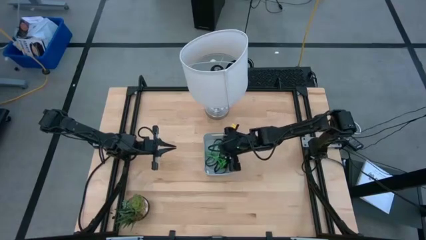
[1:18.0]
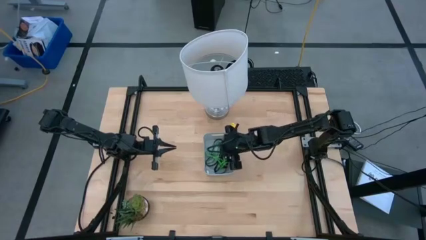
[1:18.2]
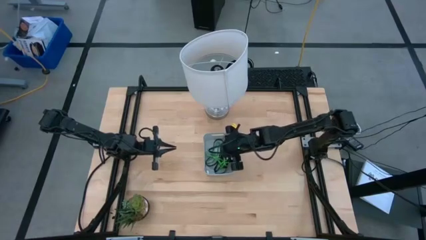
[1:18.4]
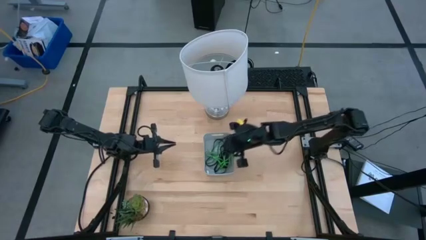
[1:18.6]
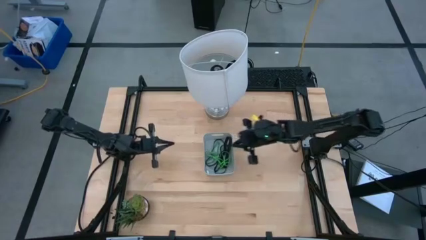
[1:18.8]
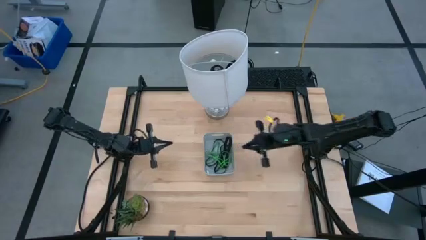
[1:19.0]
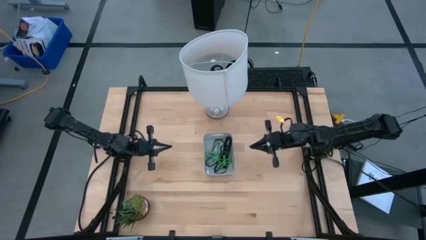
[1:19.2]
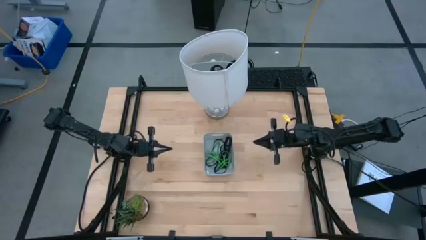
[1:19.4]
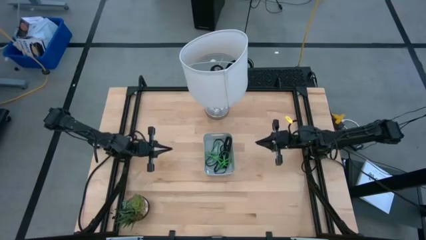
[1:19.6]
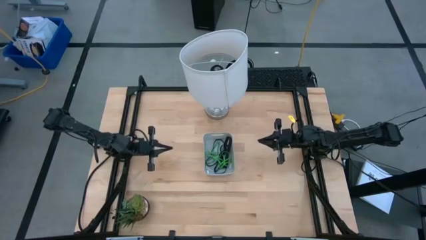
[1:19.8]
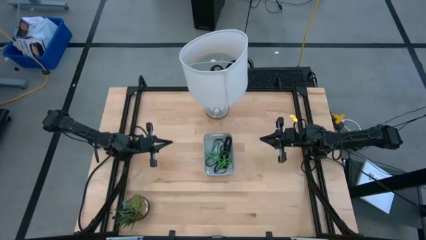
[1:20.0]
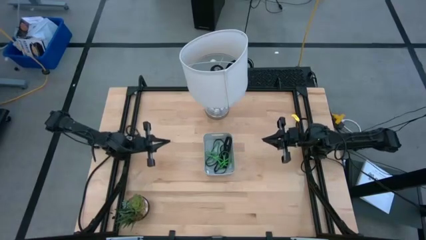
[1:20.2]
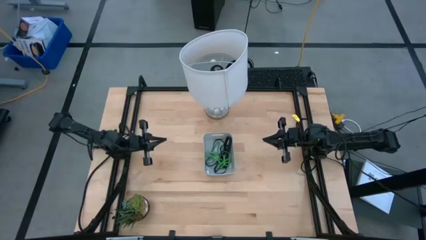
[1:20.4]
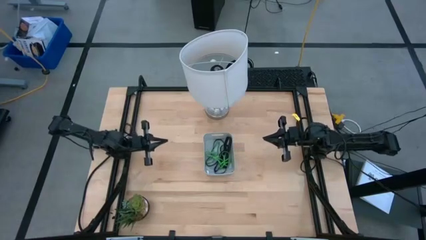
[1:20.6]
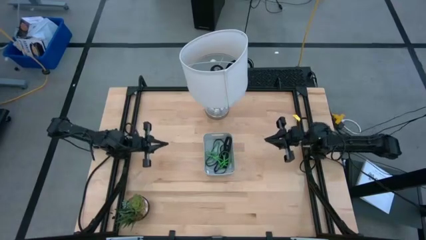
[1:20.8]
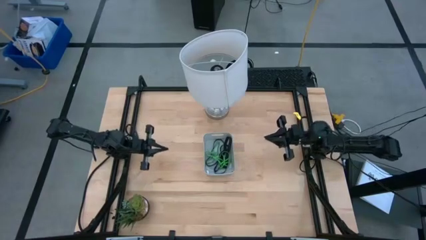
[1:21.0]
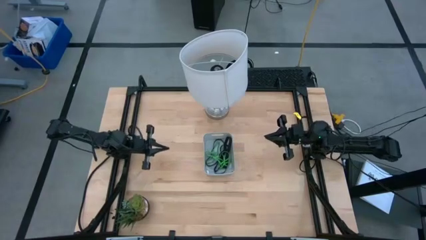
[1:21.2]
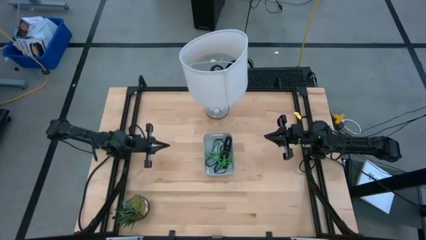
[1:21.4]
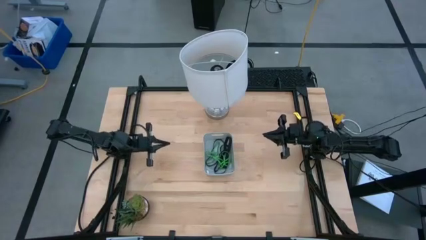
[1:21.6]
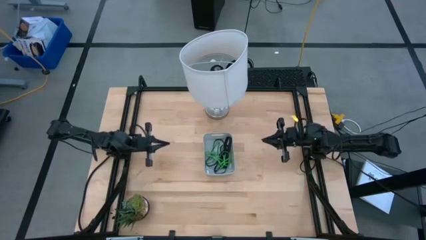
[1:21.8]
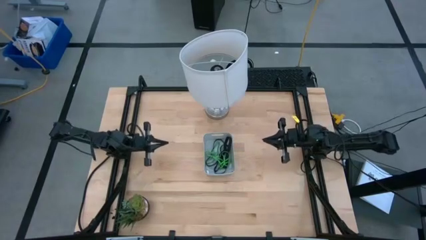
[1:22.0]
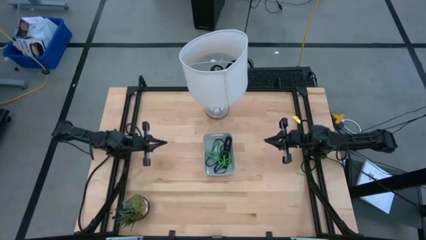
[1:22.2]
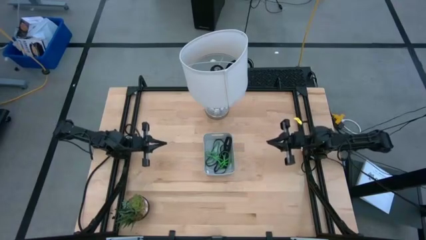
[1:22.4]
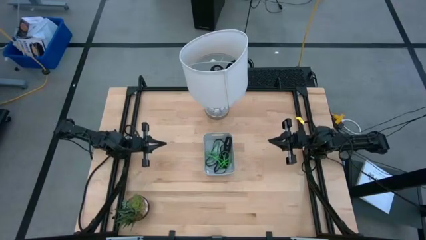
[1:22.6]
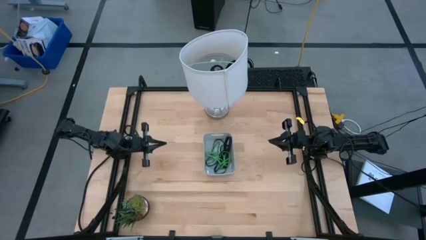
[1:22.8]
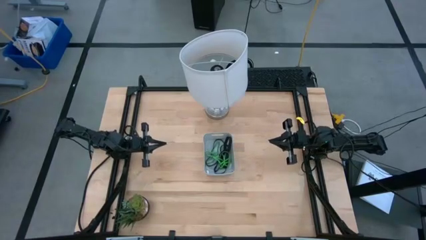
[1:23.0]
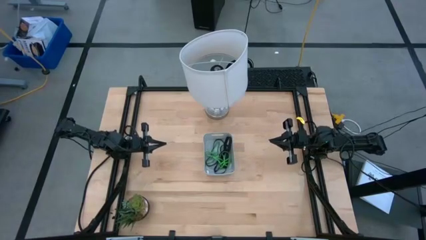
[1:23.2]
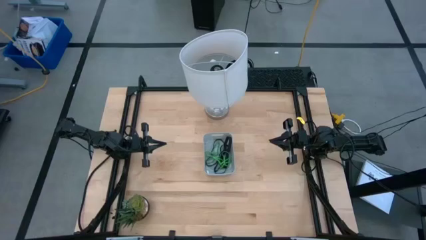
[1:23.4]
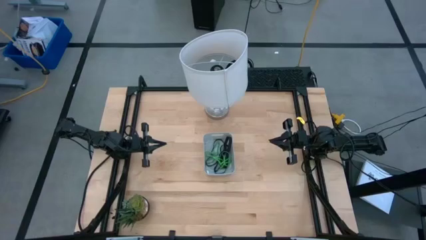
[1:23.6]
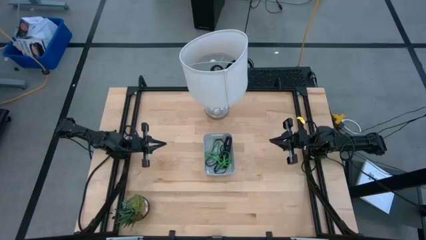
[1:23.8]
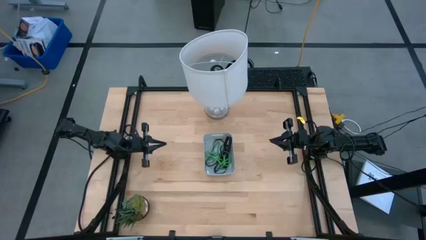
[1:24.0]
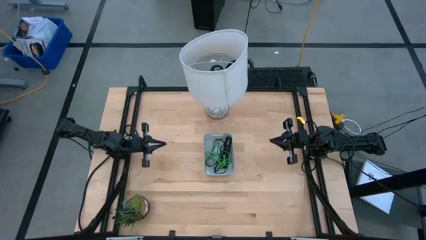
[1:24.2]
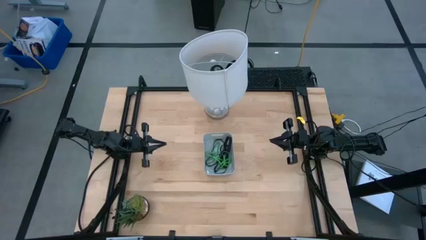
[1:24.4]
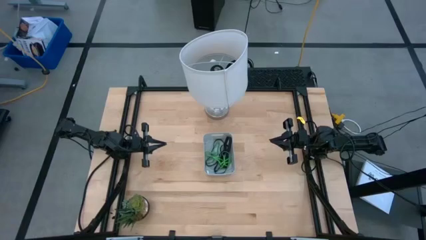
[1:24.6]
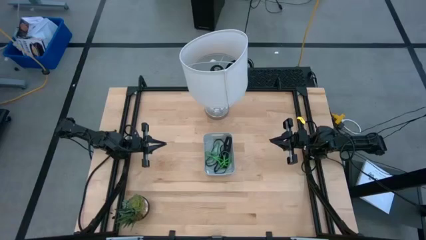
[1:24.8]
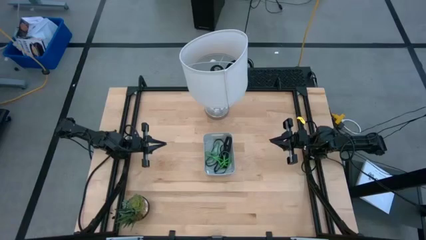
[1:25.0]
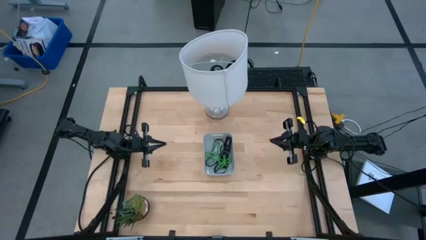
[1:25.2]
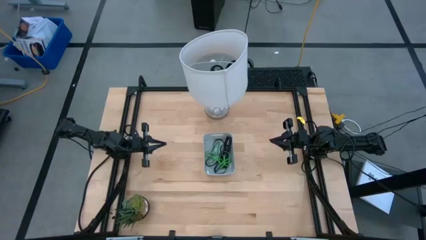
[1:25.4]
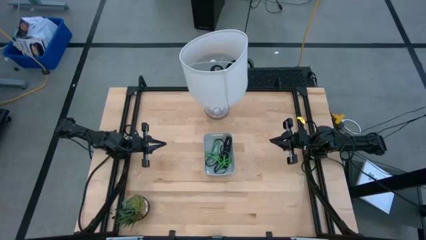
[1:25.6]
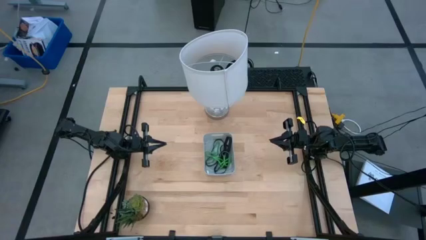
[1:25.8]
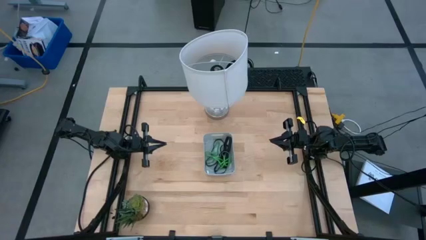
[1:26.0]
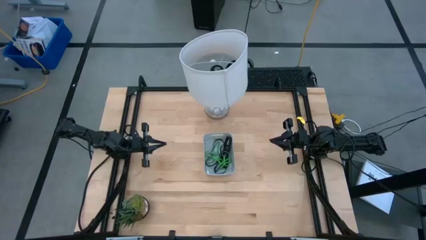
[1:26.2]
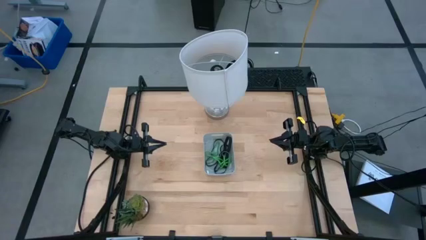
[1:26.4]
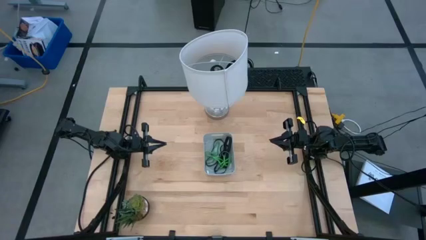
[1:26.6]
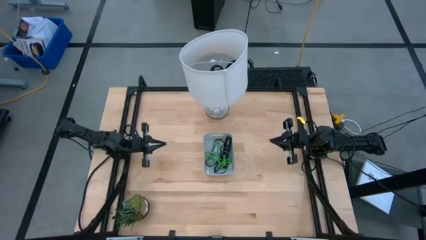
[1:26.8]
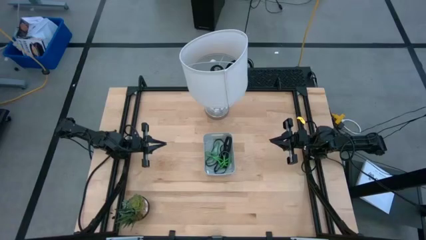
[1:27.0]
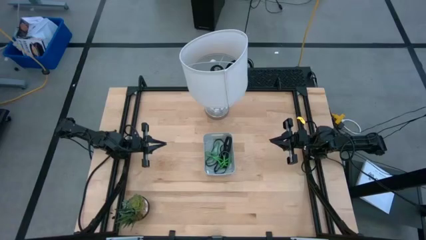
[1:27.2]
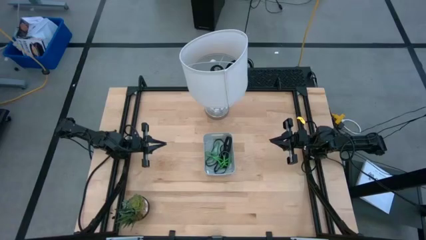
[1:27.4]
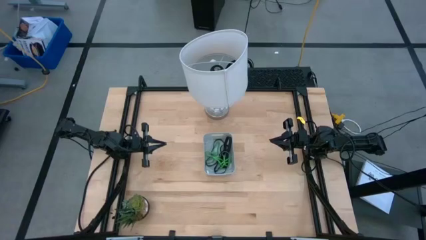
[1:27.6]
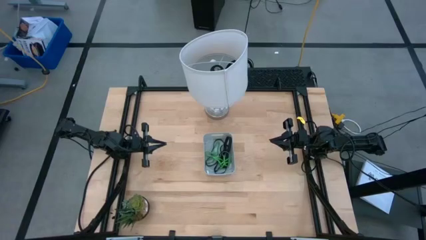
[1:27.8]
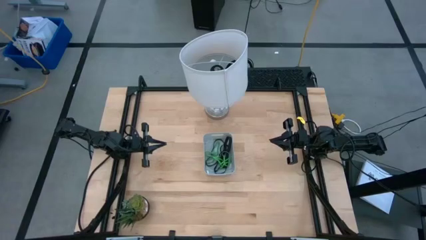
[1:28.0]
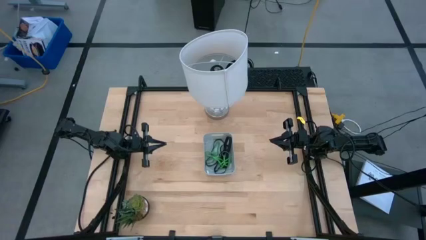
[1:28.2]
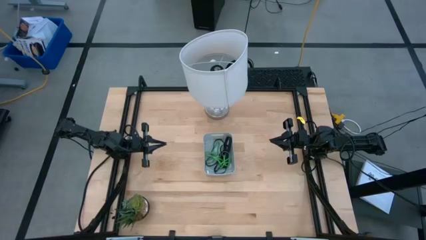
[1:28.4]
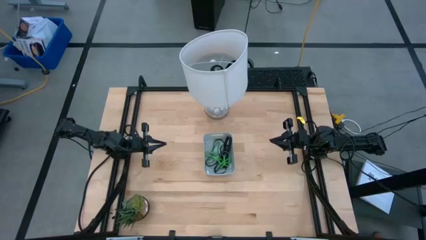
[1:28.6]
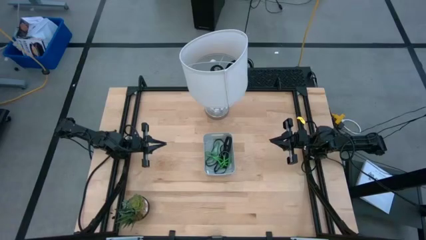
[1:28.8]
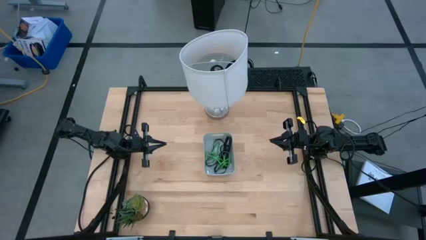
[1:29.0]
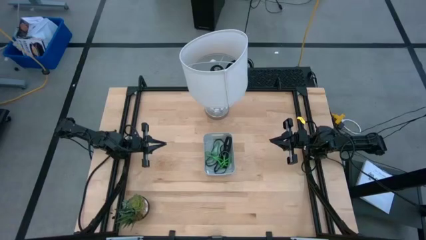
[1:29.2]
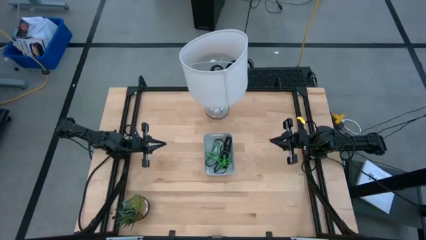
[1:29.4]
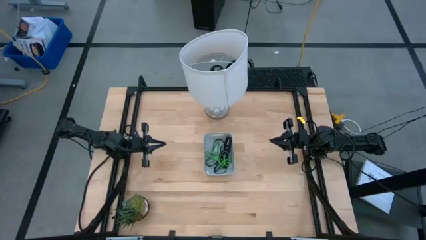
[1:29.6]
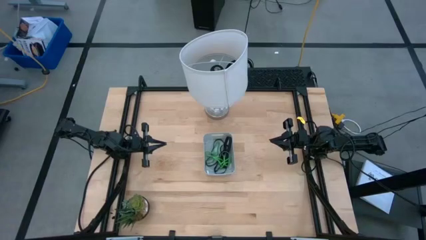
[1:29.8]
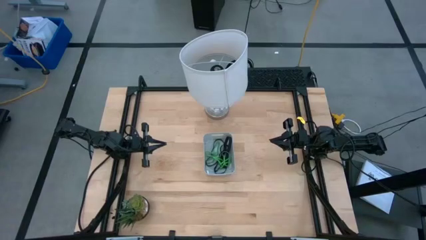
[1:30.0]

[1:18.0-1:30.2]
Task: Pick and place rubber bands into bin
Return to Home Position

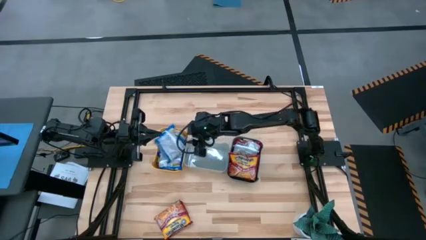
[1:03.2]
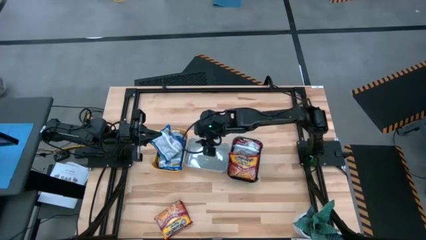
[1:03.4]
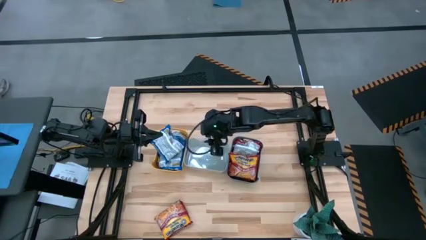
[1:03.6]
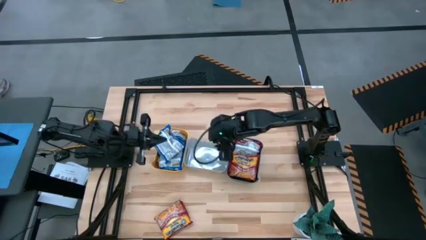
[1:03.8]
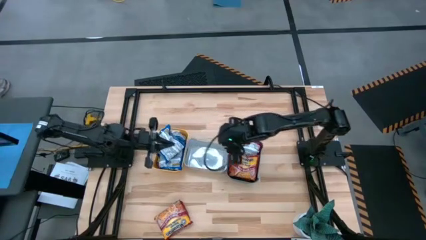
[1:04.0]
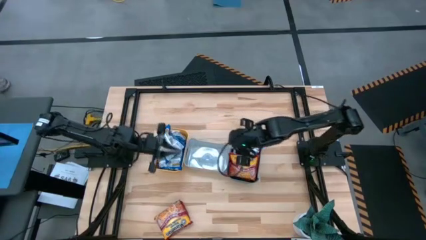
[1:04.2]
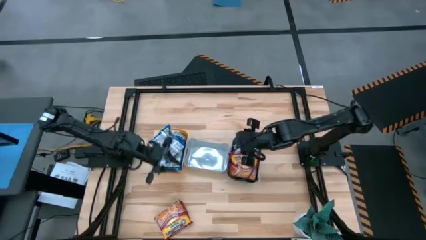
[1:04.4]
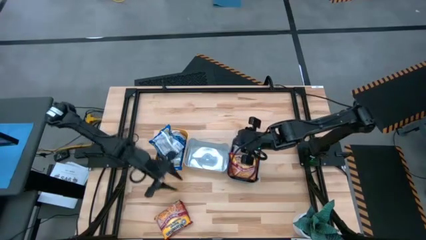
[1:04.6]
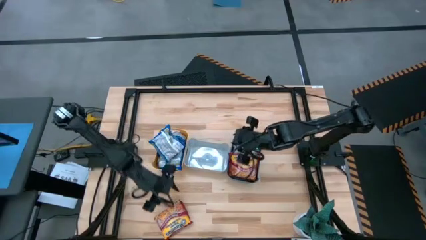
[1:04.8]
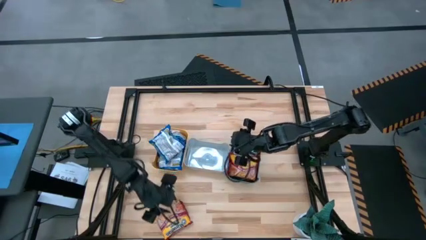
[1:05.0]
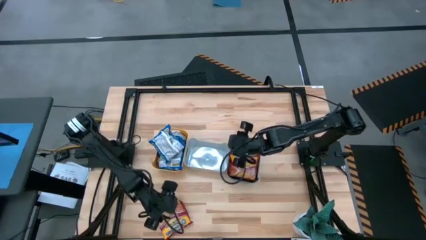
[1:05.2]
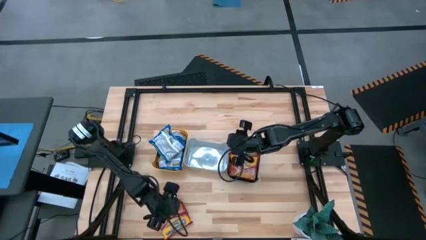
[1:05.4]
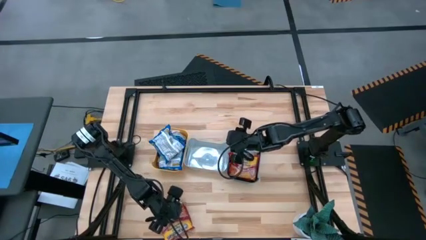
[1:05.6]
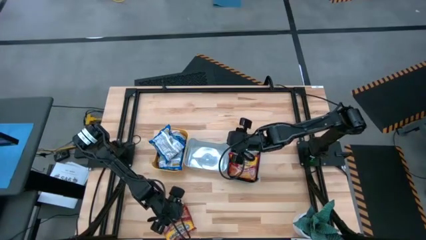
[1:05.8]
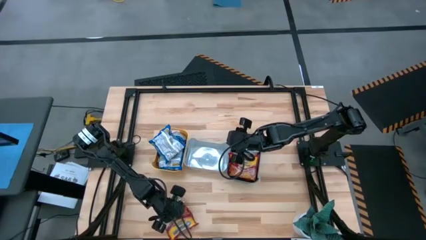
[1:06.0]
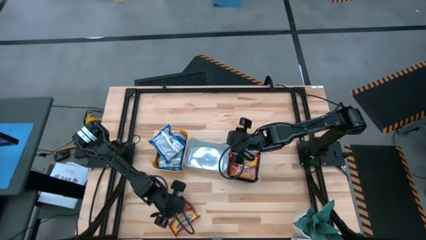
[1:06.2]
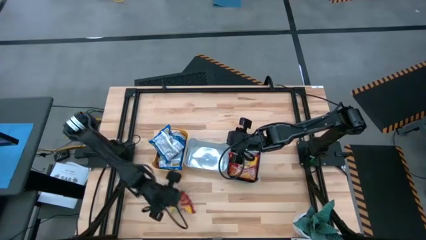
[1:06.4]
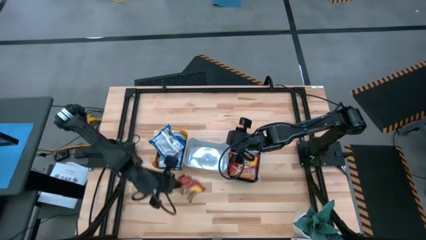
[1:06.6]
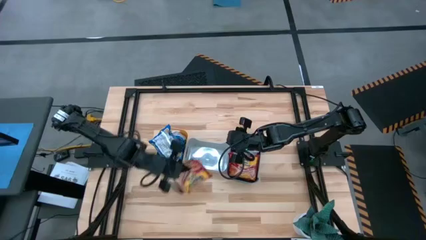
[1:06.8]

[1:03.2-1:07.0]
Task: Sort Maruchan noodles
Put the red noodle pack into the white bin
